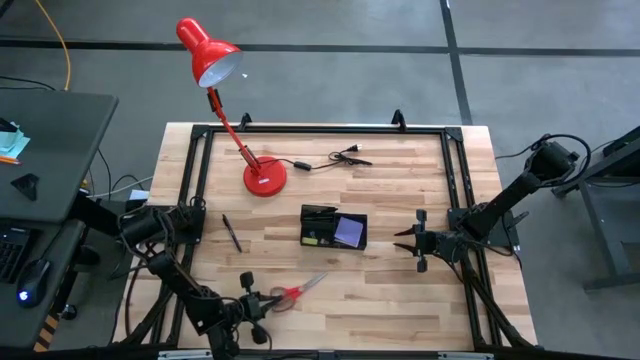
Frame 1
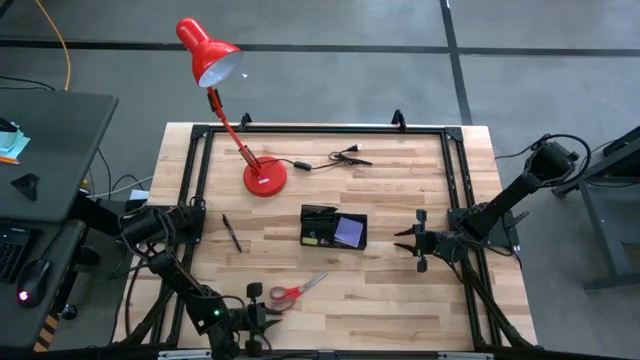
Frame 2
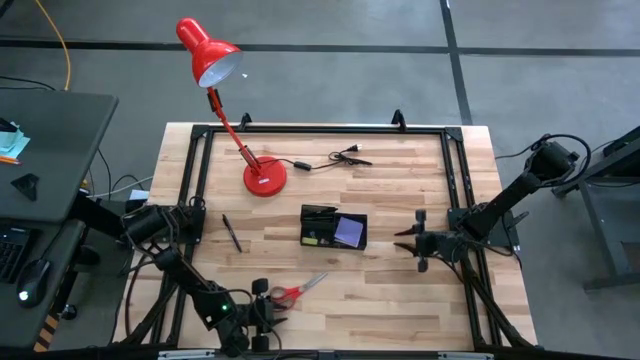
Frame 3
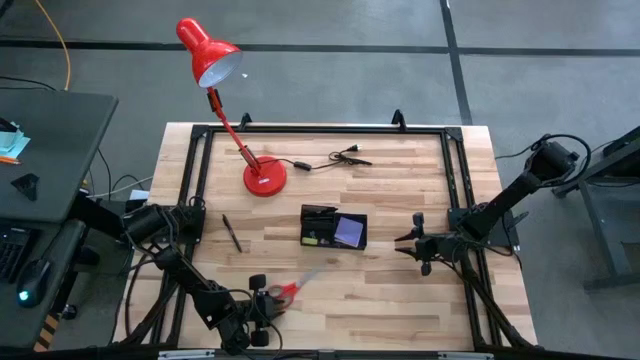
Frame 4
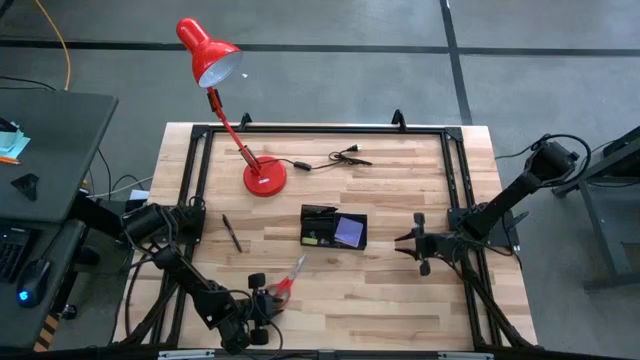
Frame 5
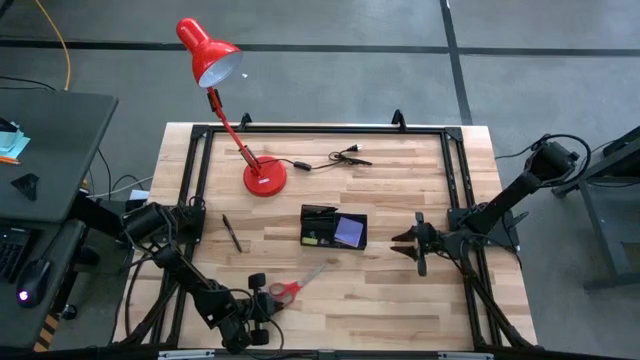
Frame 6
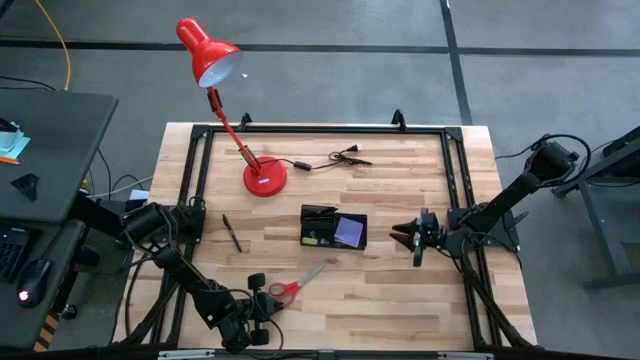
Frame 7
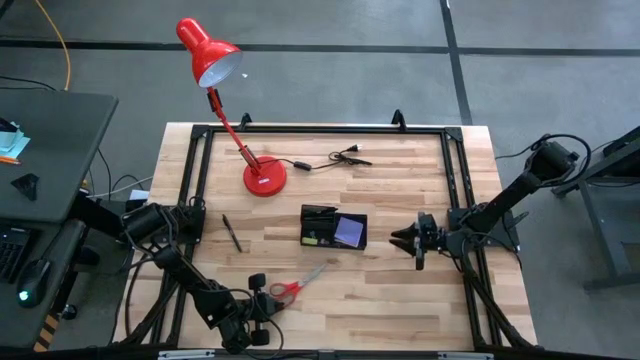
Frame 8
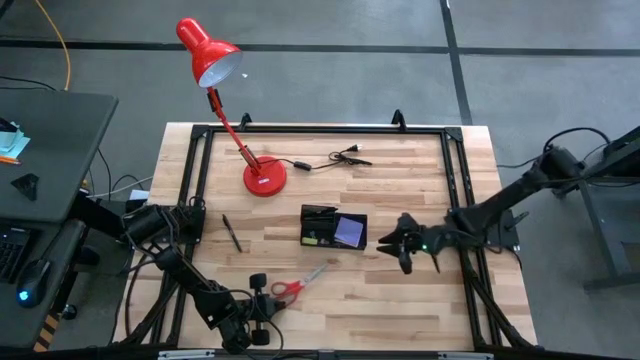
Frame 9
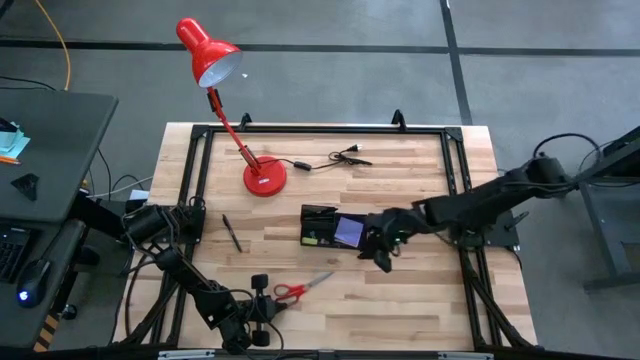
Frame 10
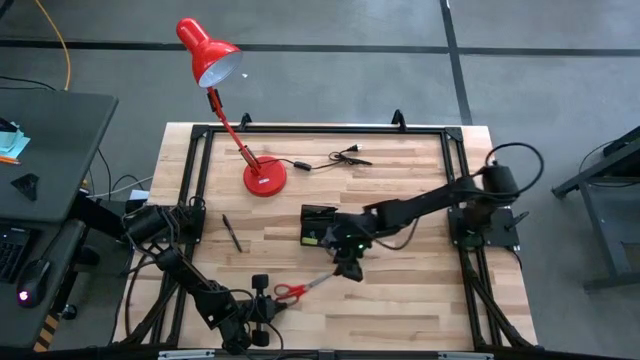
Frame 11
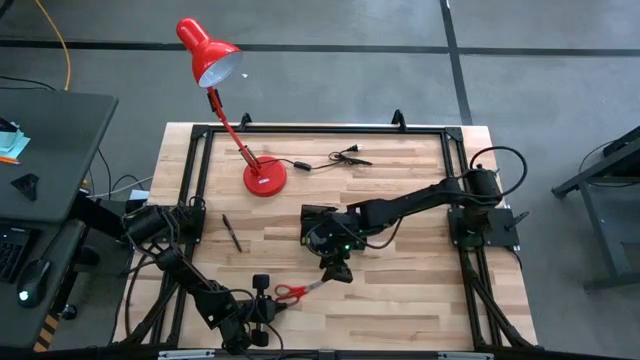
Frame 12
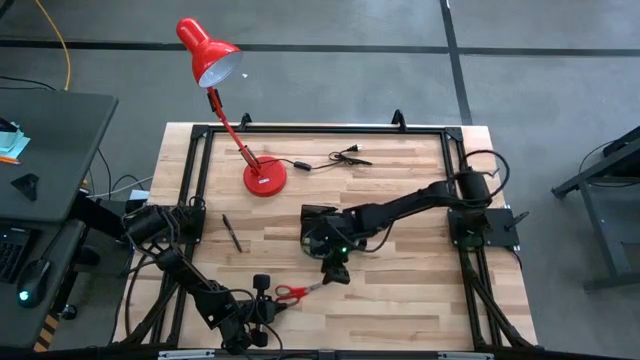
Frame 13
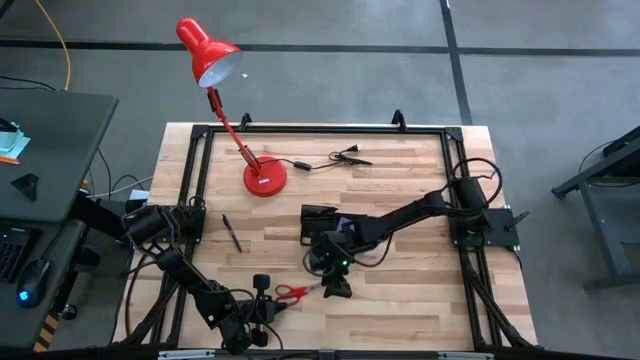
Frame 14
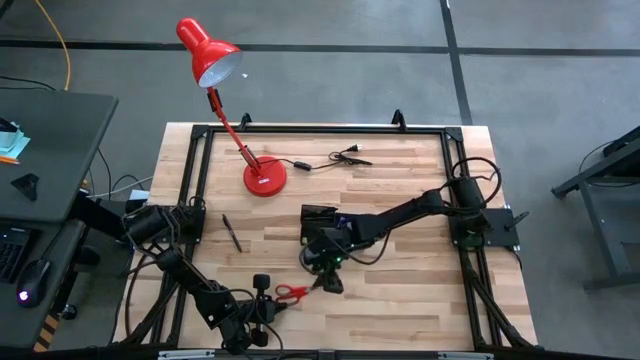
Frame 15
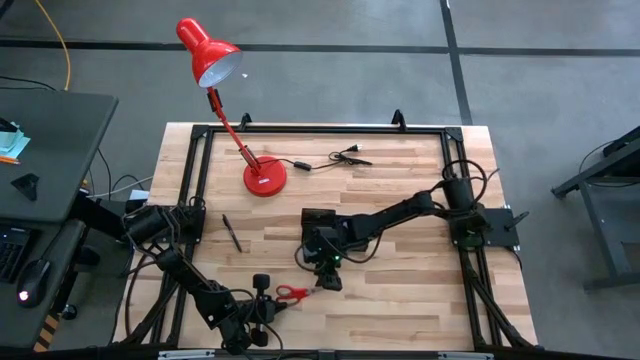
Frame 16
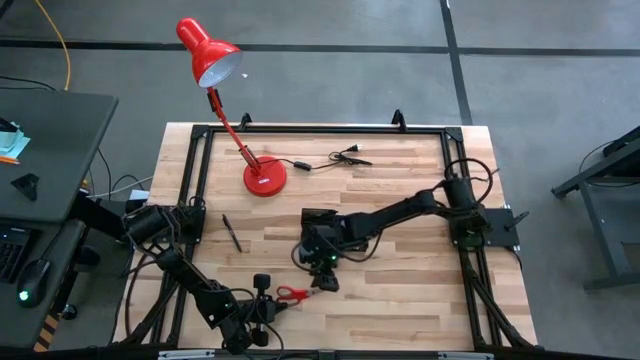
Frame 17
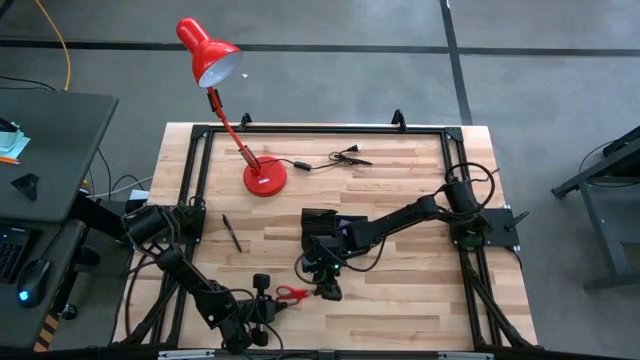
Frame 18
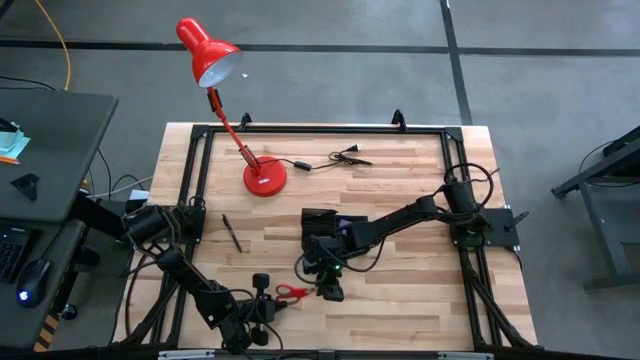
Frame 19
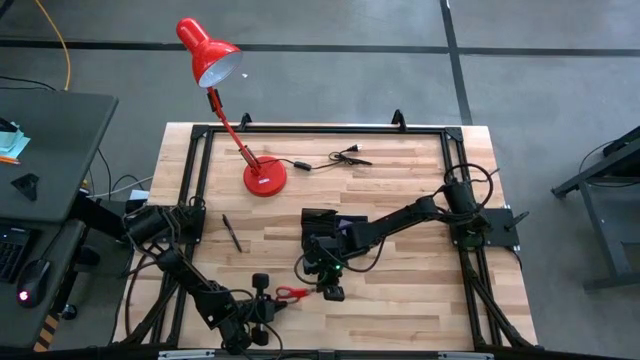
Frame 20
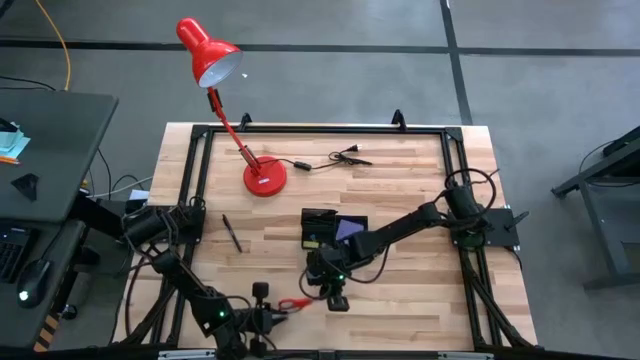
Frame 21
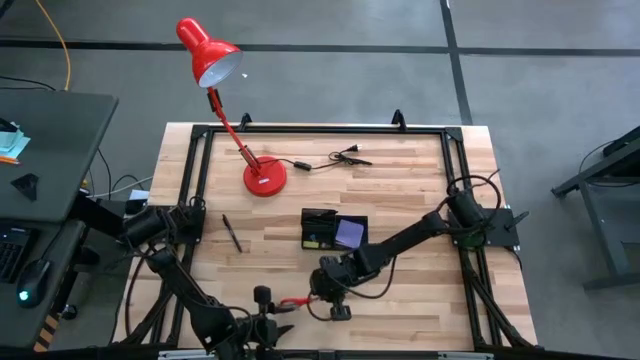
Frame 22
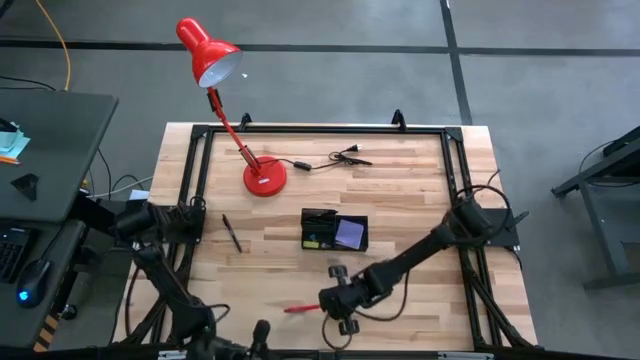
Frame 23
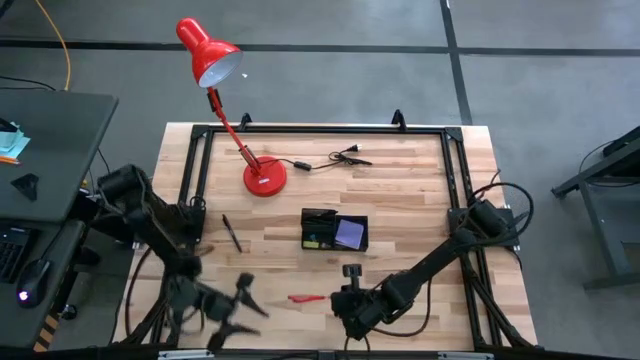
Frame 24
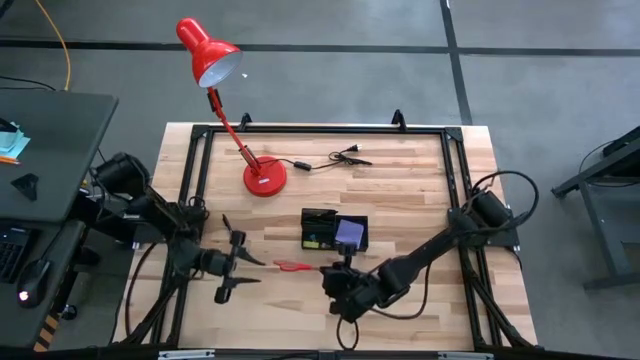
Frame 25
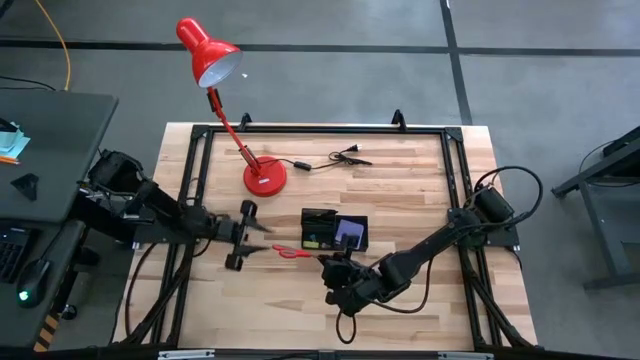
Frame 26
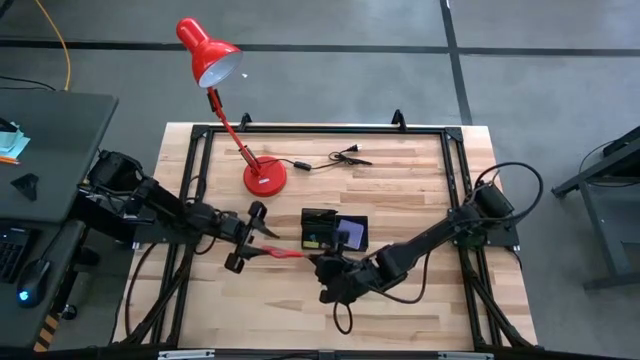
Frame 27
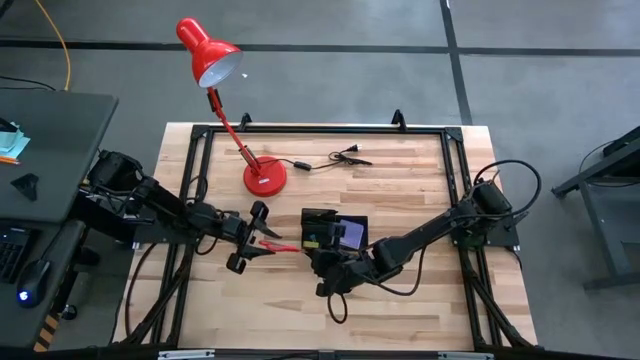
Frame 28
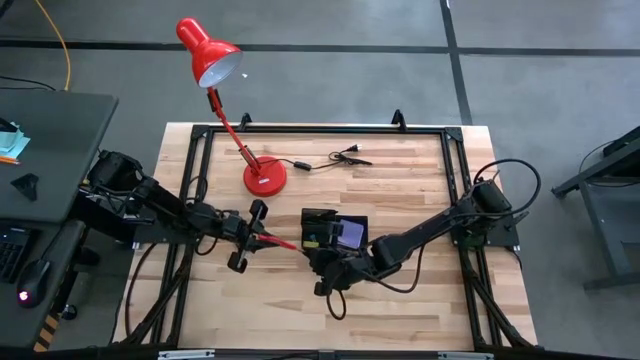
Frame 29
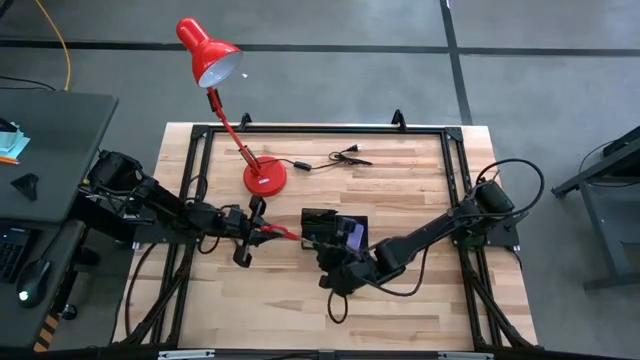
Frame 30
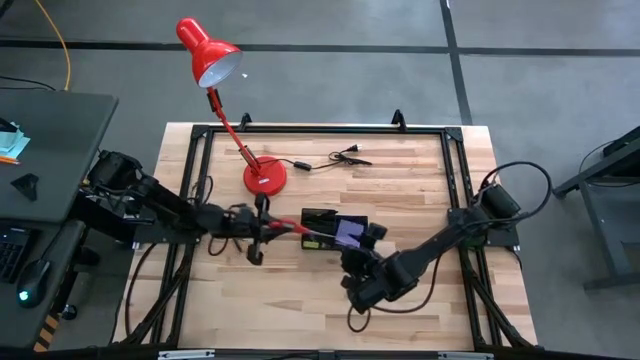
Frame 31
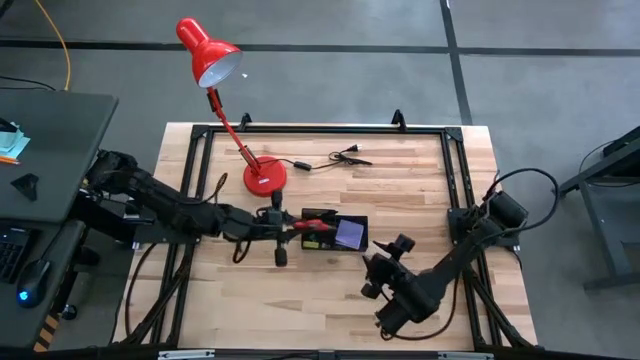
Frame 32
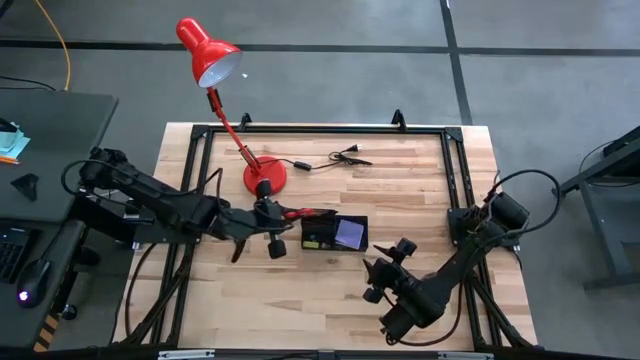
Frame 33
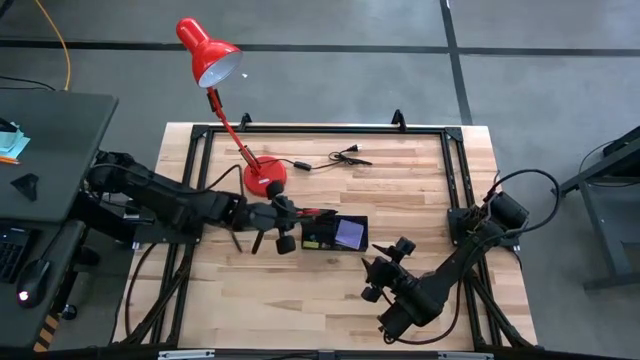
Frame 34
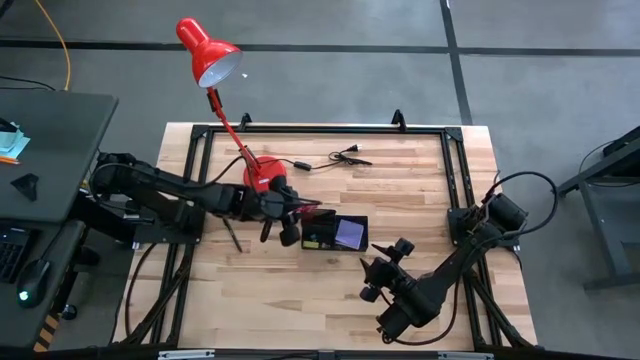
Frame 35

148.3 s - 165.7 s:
Task: Pick and place office supplies into organizer
Put the red scissors into the black desk organizer

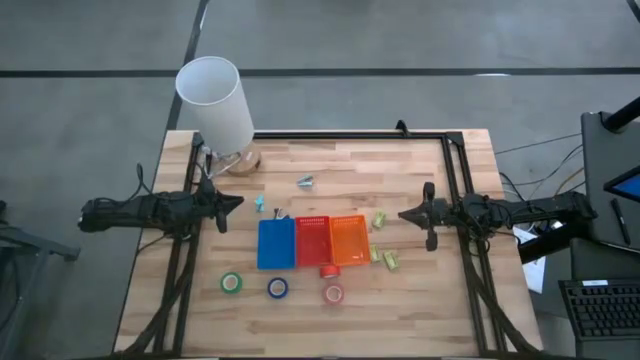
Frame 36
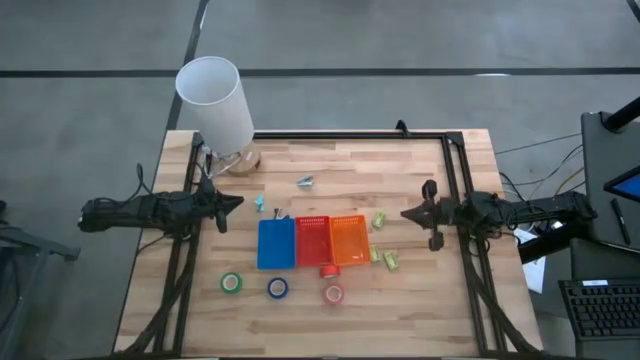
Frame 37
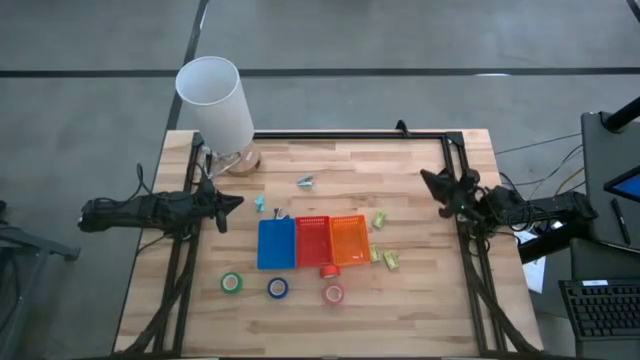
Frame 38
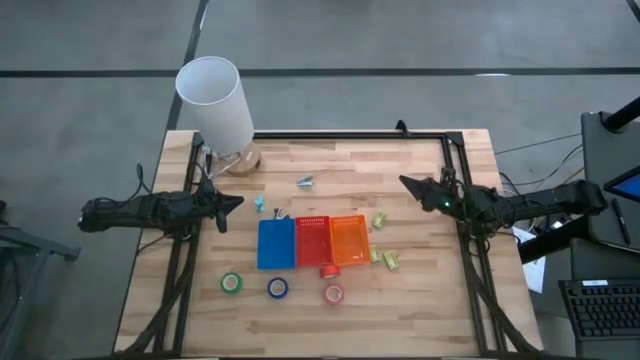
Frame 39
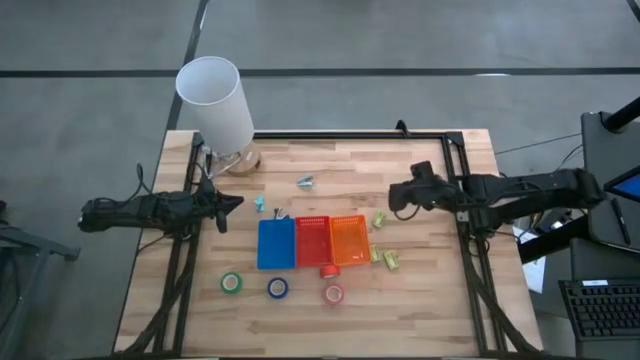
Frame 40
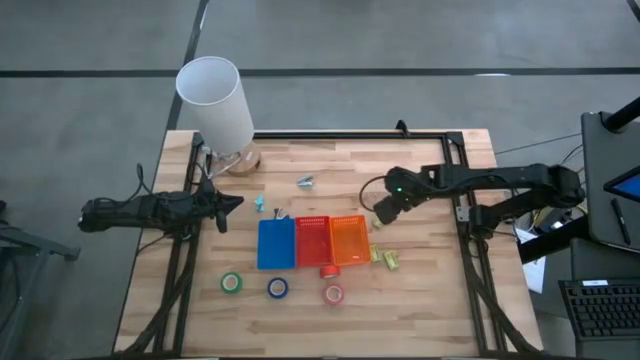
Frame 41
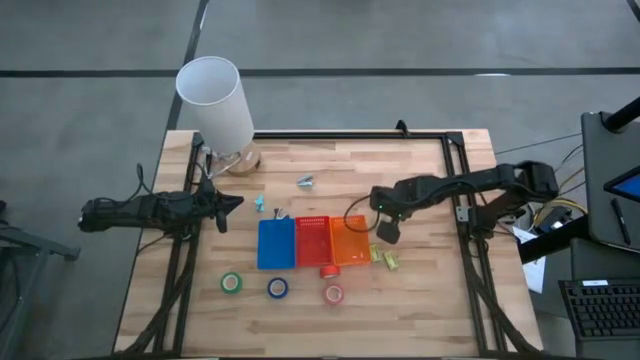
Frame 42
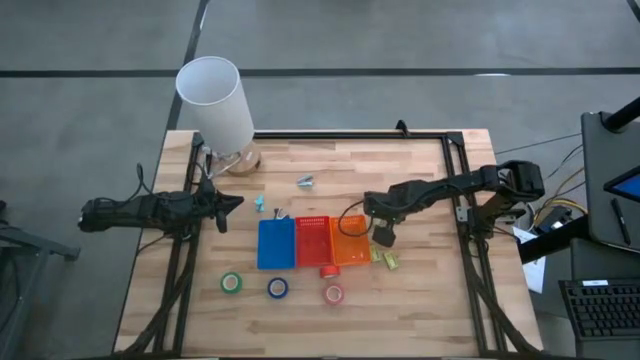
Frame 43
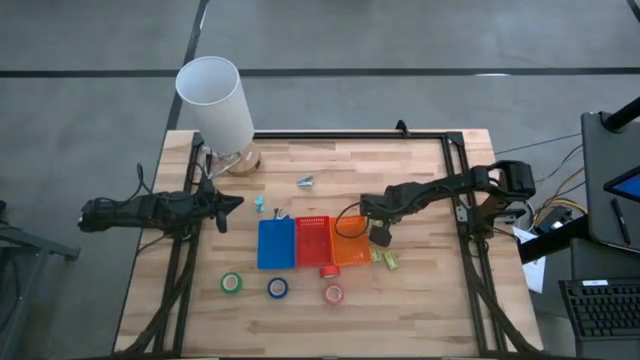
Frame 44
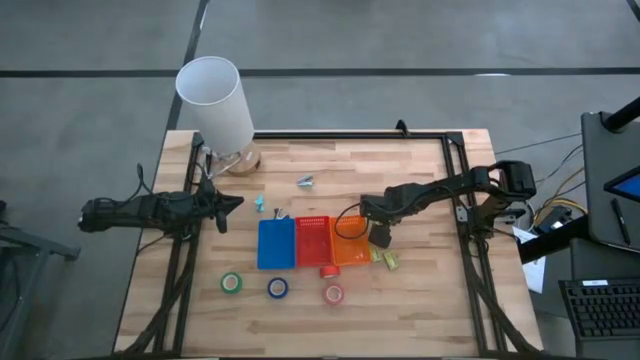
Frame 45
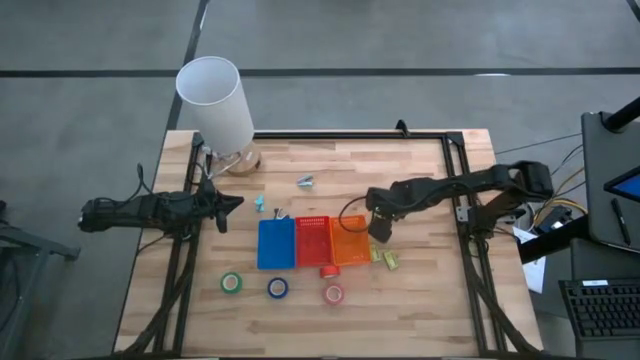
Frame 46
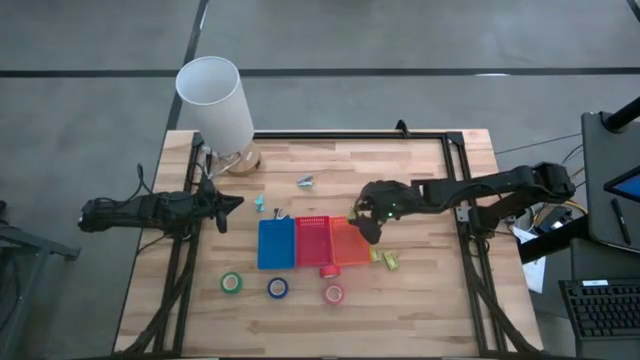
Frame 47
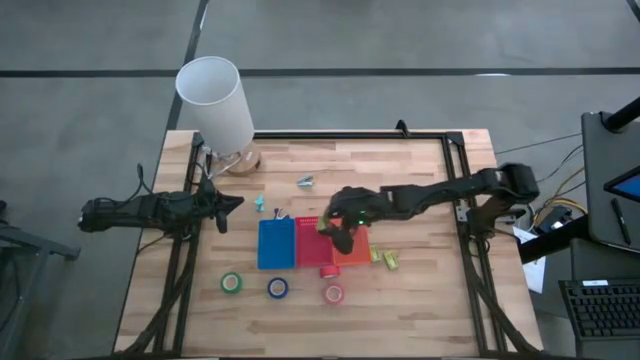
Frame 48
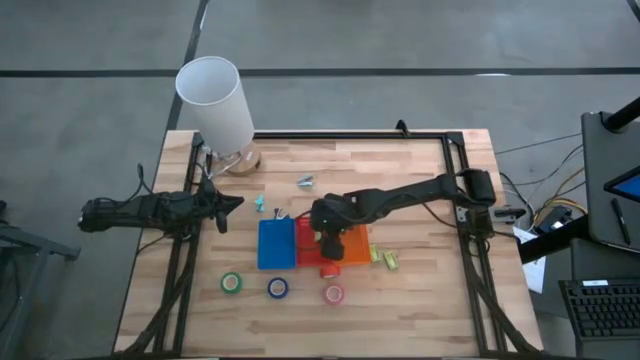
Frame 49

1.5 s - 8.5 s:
Task: Pick and place Stapler, Stapler remover, tape
Put the top green staple box into the red bin
